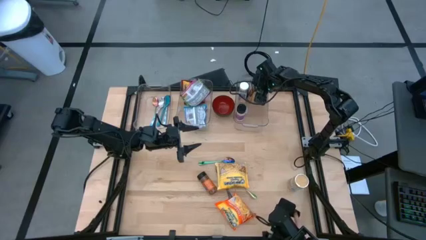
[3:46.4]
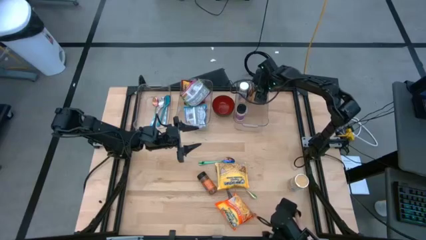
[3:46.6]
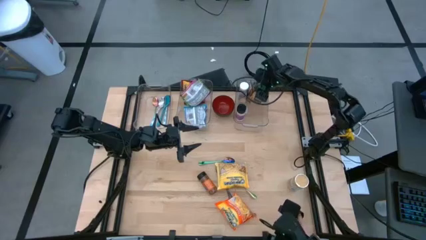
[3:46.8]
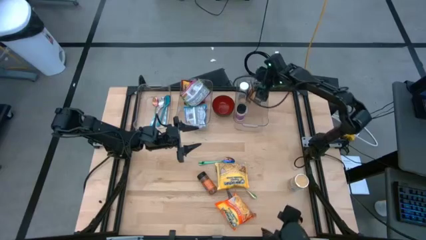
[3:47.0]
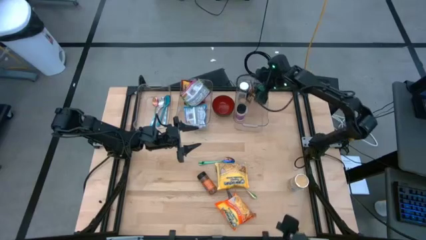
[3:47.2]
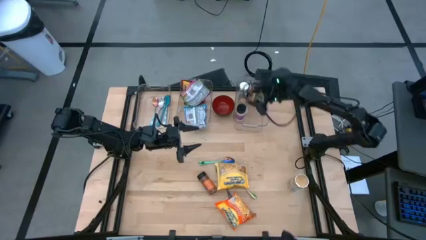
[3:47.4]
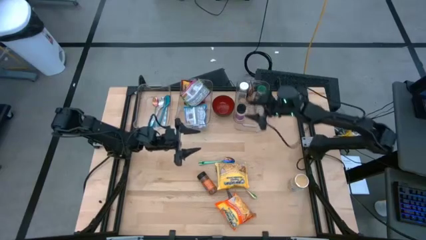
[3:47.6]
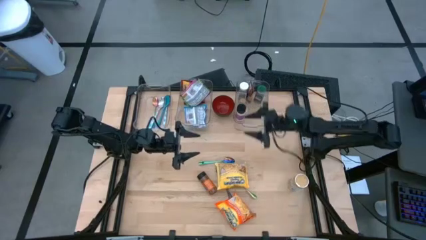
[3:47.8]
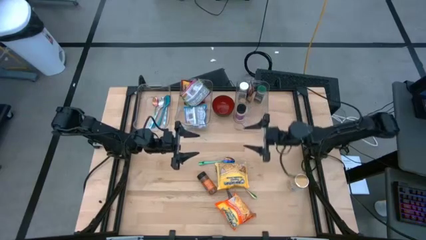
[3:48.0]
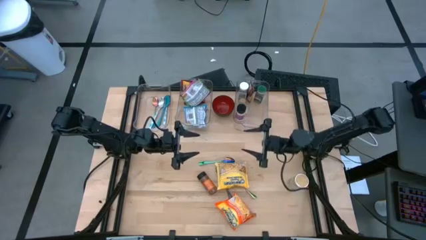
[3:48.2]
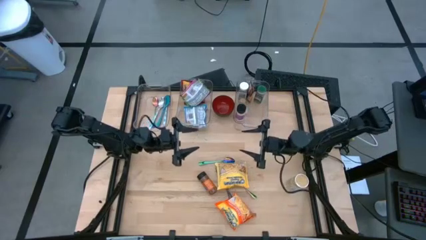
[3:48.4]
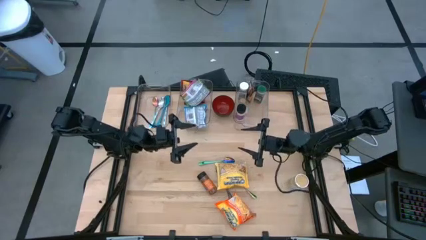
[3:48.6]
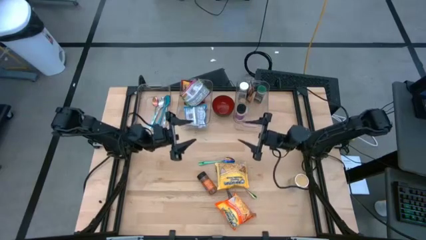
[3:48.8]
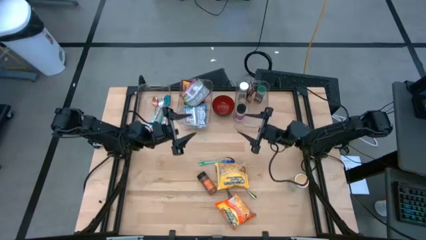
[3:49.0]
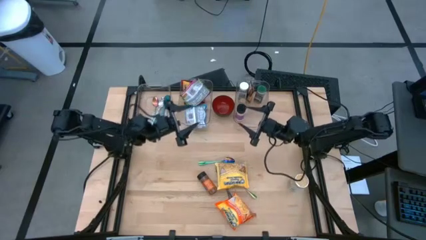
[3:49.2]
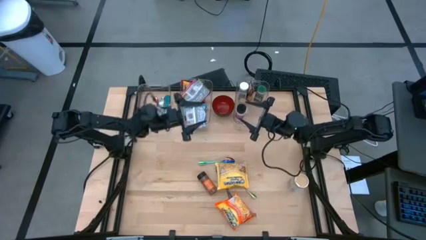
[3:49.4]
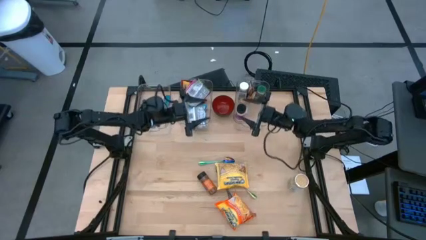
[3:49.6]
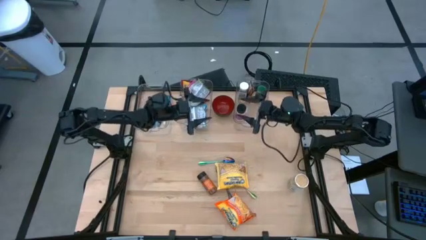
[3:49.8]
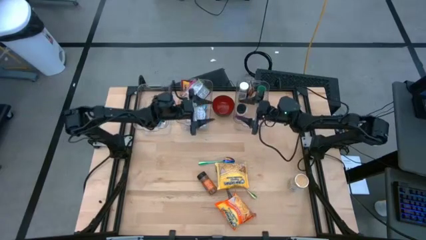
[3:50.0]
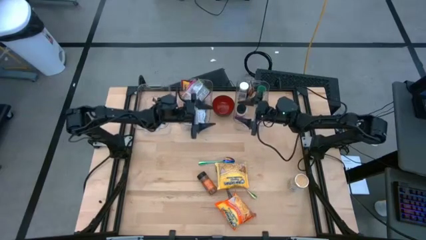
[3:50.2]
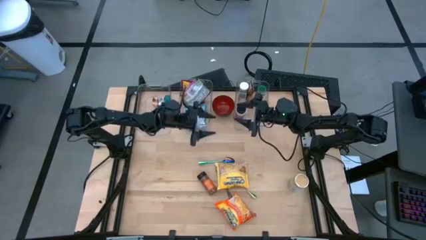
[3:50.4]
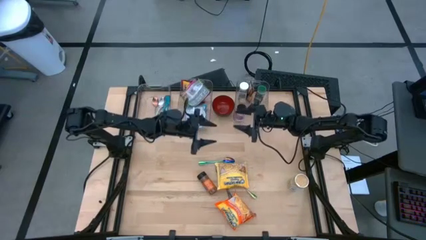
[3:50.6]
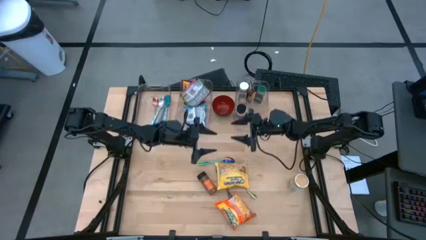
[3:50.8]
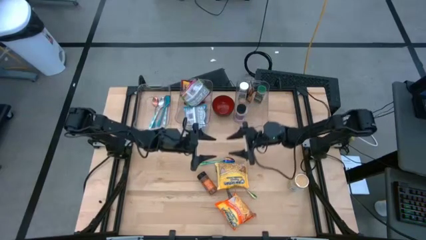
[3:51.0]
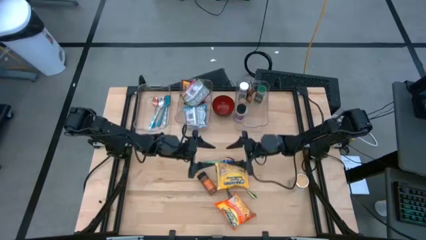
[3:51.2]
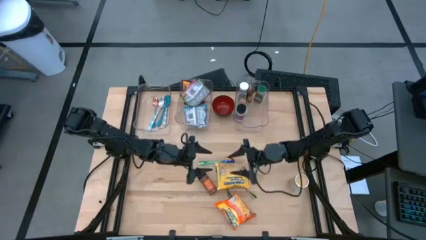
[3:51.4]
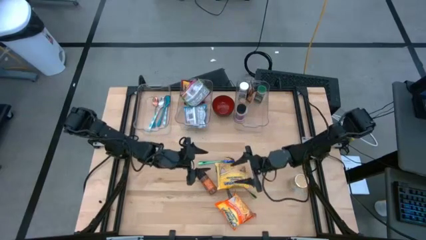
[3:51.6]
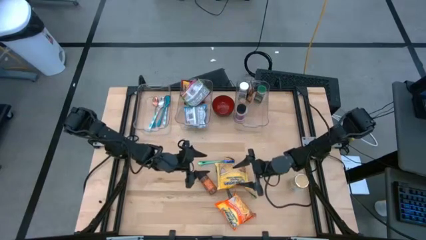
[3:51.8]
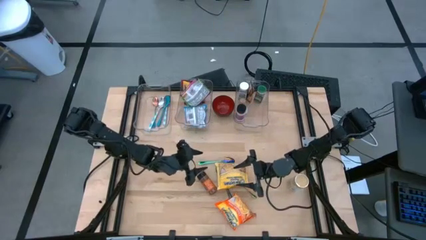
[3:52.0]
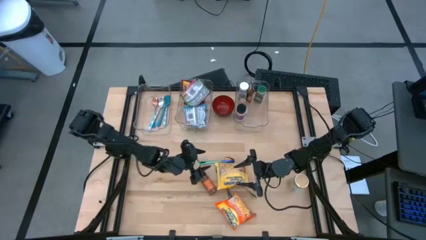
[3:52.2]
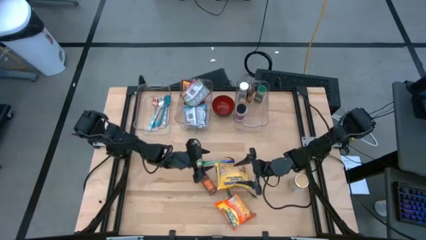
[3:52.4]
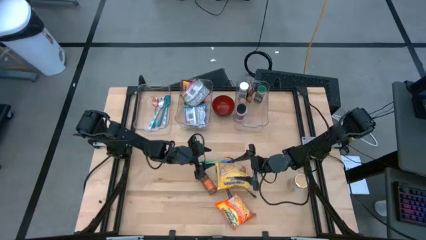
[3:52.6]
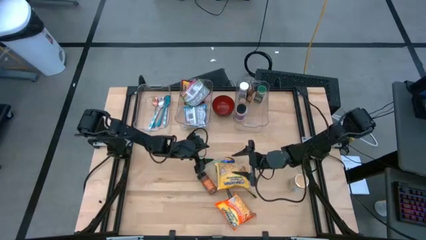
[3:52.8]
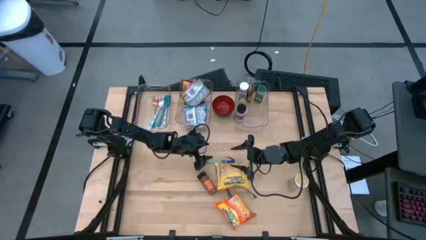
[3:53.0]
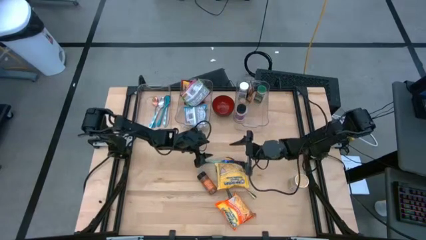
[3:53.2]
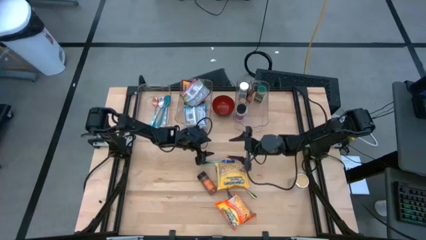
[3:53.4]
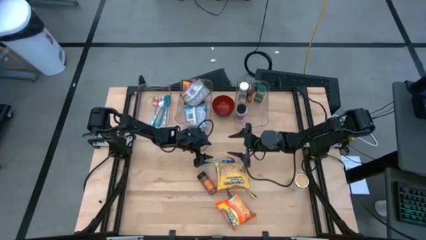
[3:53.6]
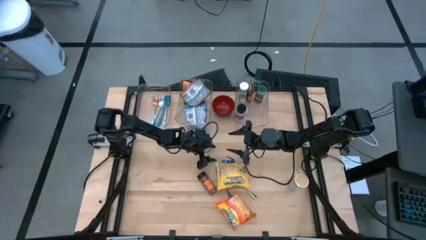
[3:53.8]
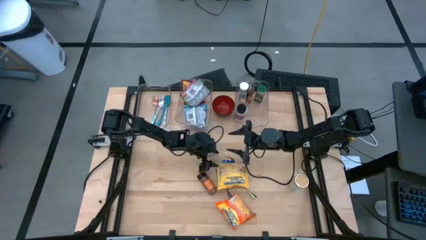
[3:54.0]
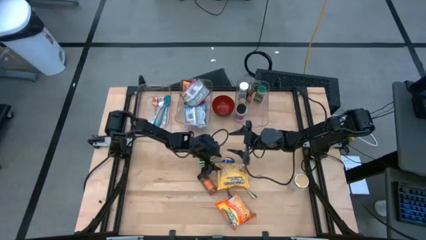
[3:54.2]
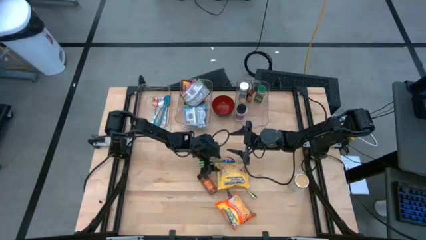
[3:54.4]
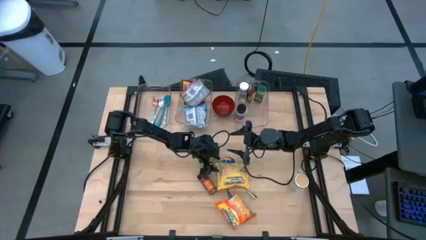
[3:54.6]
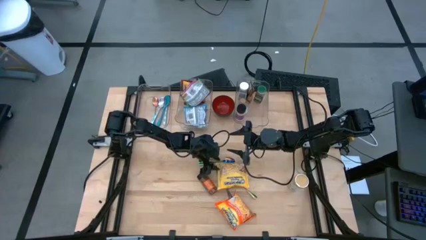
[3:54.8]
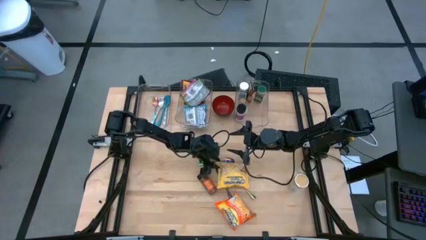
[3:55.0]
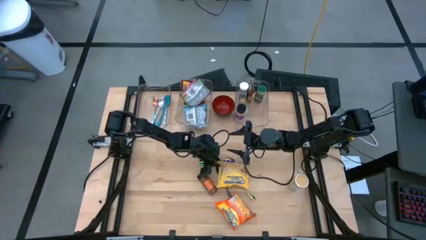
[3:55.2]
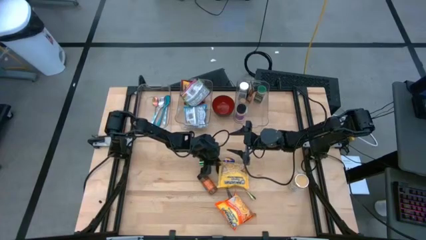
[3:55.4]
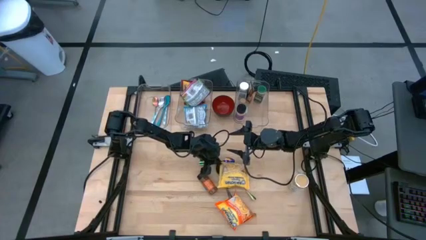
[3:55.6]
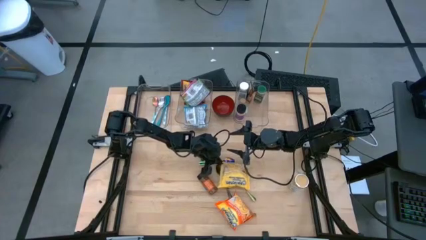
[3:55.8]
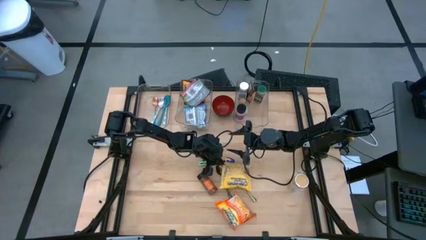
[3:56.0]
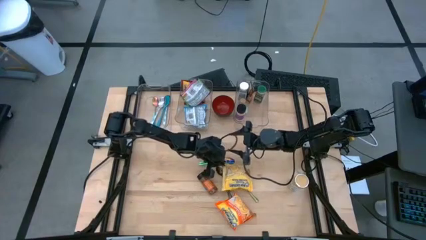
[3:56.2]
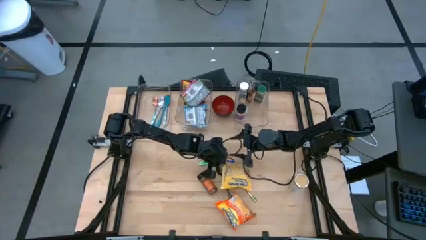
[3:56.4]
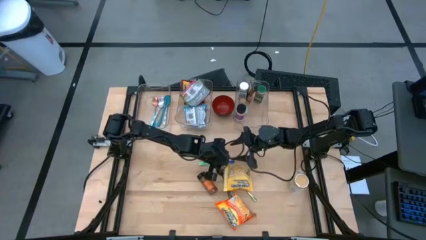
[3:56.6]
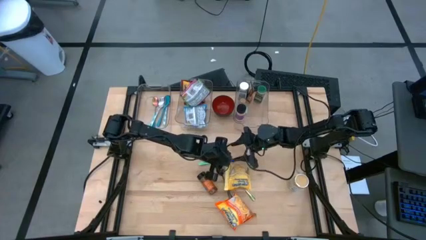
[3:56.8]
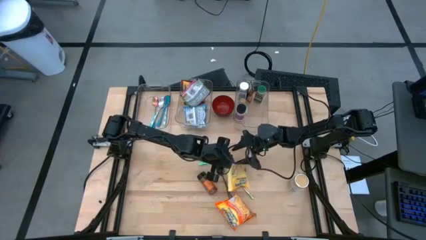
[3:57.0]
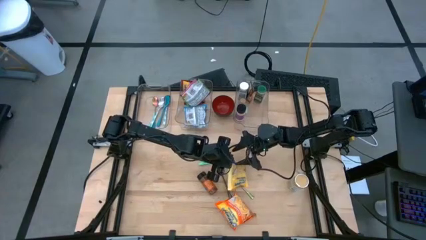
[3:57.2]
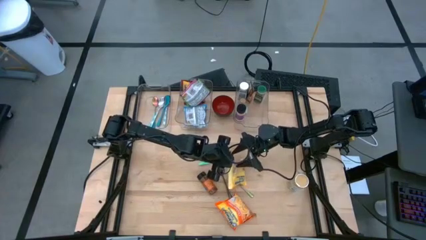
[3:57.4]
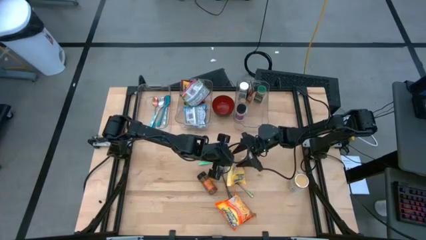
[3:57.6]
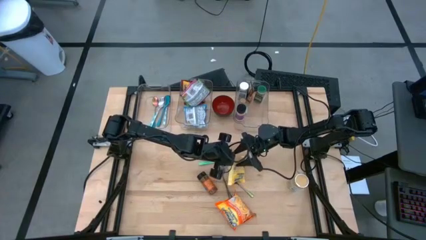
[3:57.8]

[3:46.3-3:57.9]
Task: Pick & Place Food Item
Put the yellow noodle pack into the middle transparent bin
